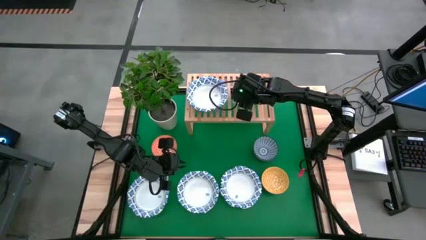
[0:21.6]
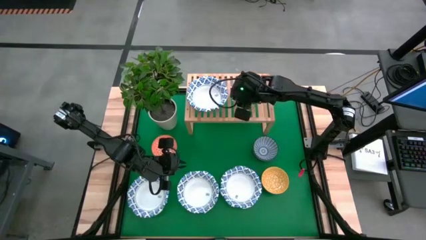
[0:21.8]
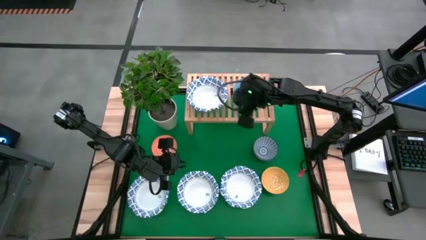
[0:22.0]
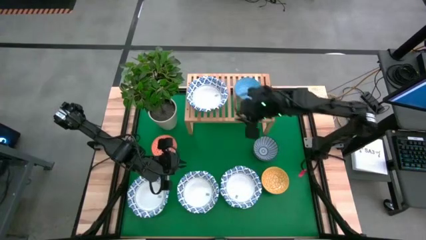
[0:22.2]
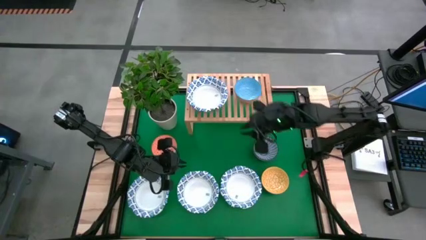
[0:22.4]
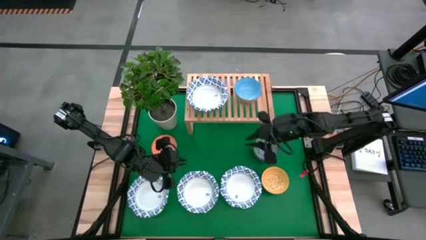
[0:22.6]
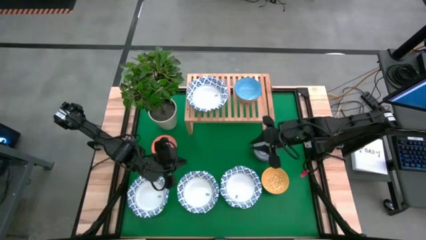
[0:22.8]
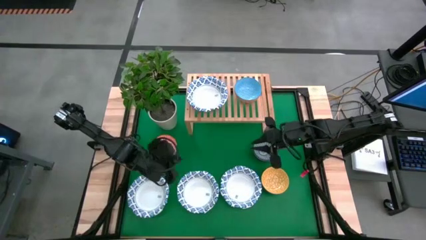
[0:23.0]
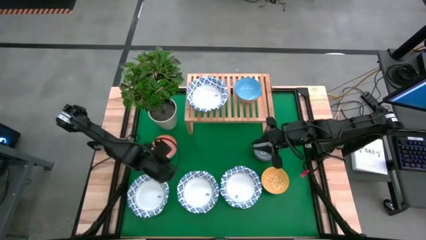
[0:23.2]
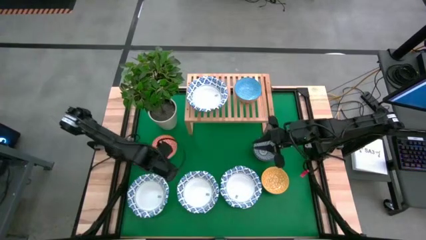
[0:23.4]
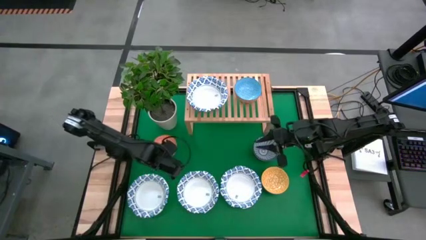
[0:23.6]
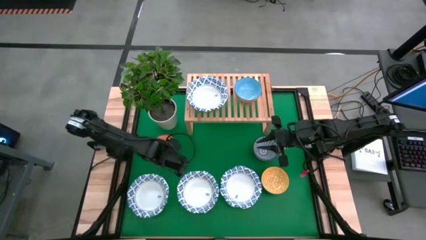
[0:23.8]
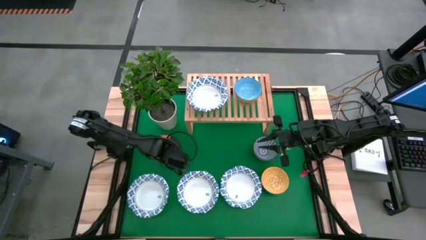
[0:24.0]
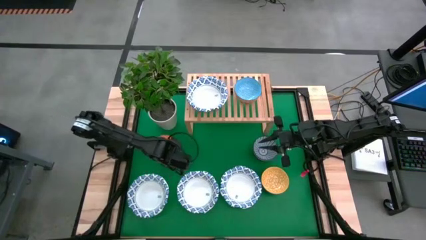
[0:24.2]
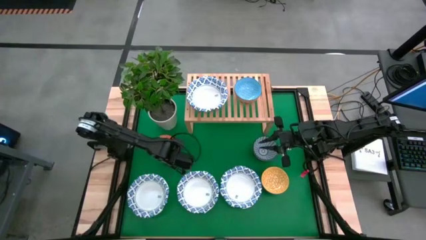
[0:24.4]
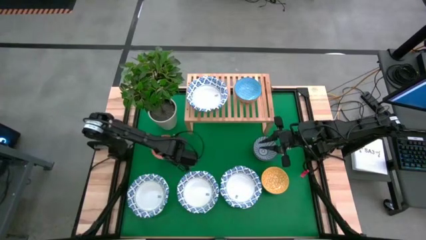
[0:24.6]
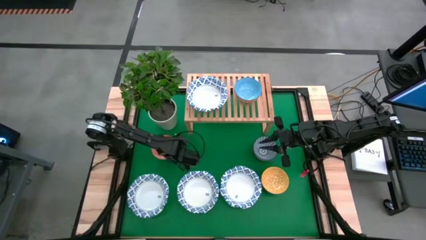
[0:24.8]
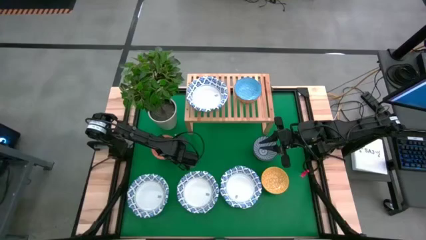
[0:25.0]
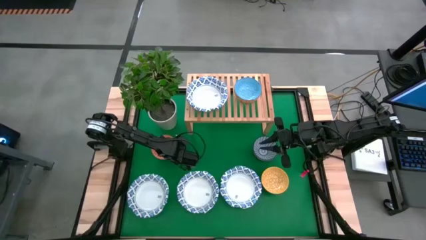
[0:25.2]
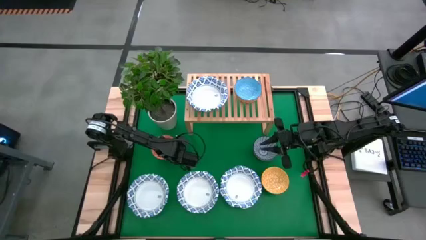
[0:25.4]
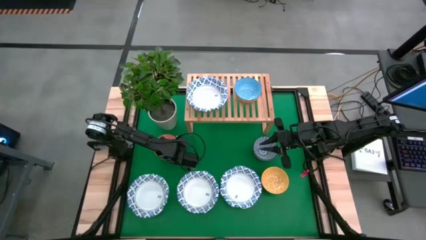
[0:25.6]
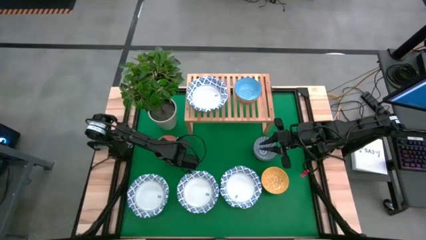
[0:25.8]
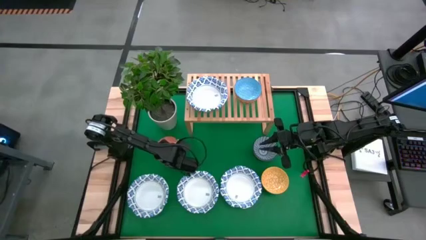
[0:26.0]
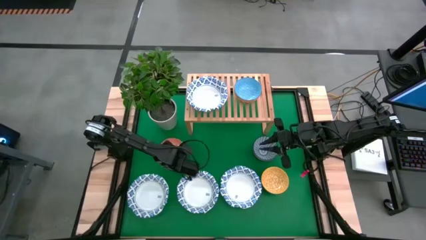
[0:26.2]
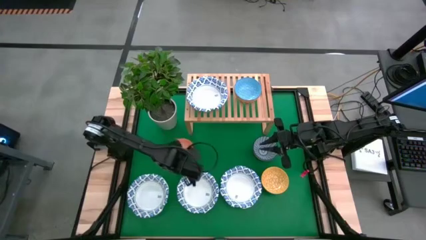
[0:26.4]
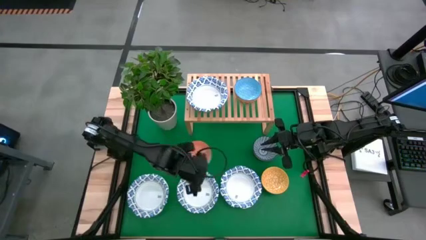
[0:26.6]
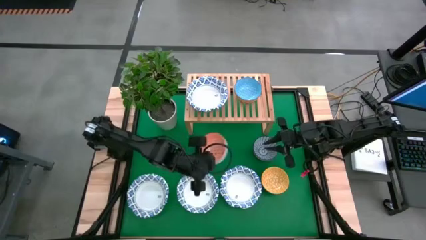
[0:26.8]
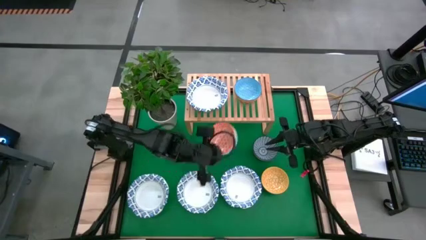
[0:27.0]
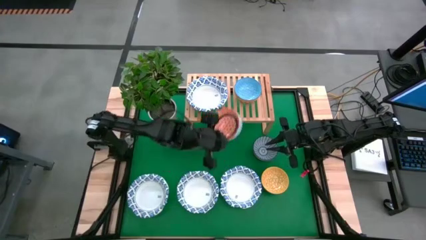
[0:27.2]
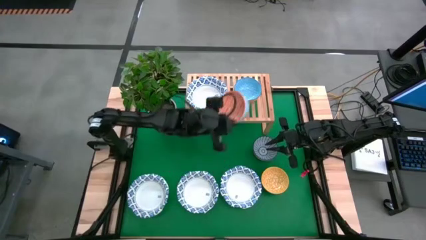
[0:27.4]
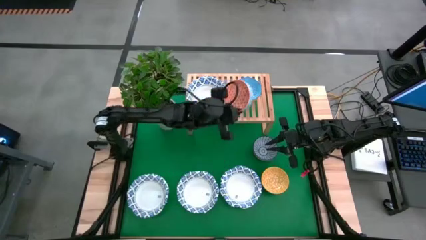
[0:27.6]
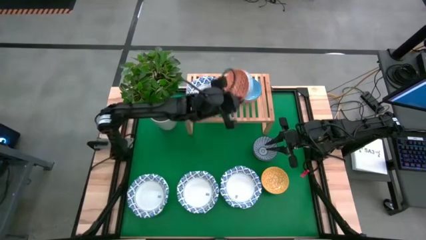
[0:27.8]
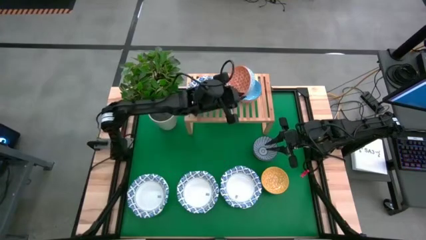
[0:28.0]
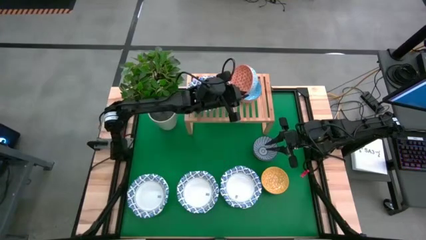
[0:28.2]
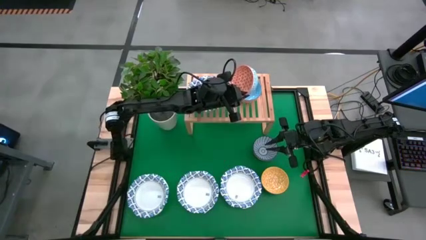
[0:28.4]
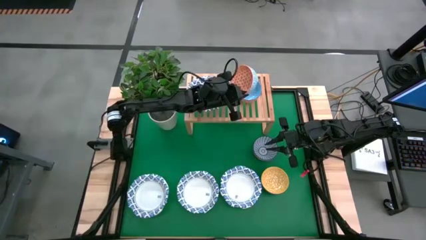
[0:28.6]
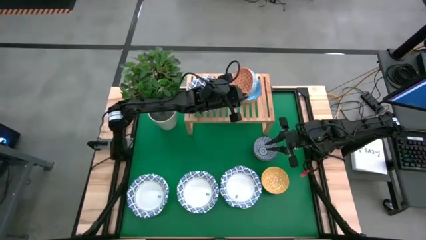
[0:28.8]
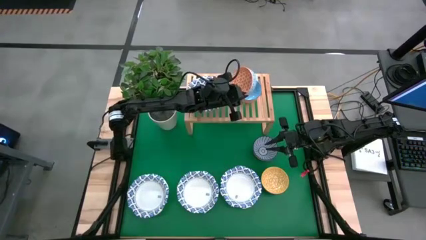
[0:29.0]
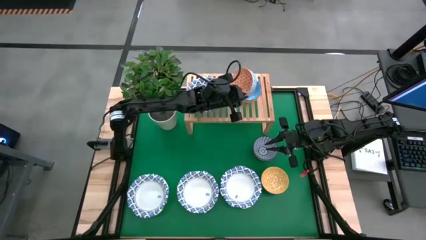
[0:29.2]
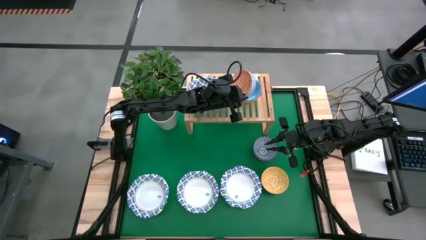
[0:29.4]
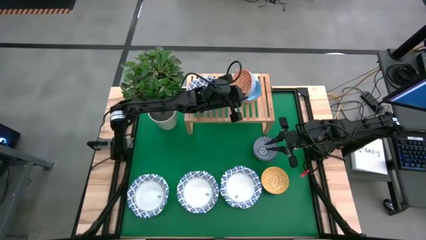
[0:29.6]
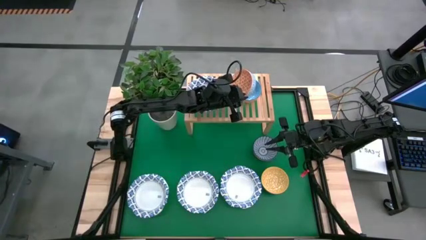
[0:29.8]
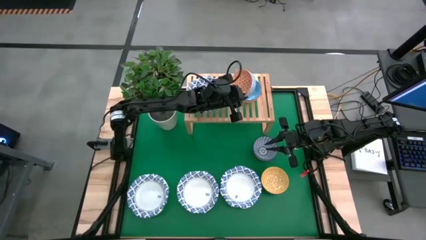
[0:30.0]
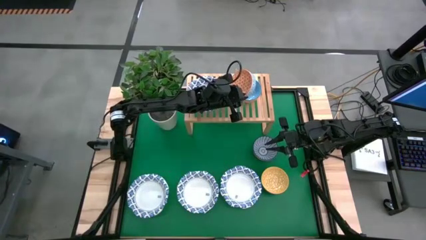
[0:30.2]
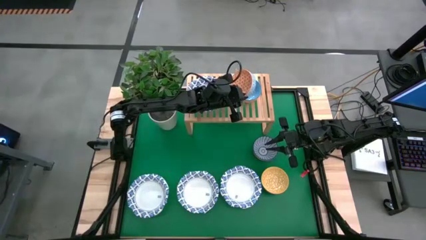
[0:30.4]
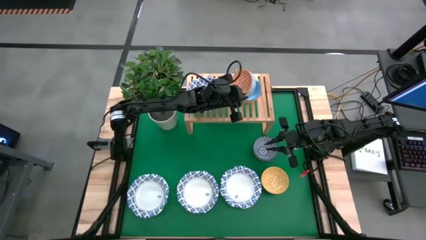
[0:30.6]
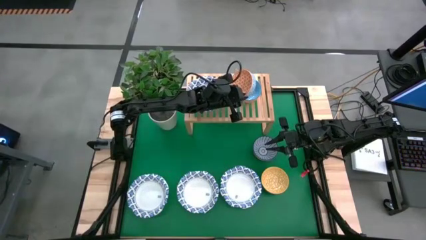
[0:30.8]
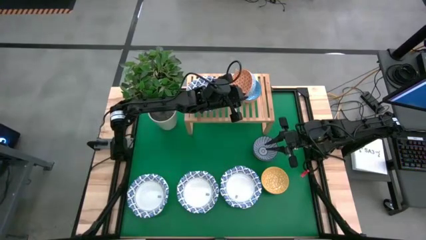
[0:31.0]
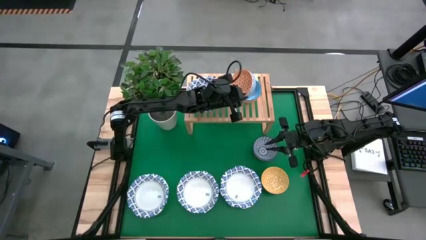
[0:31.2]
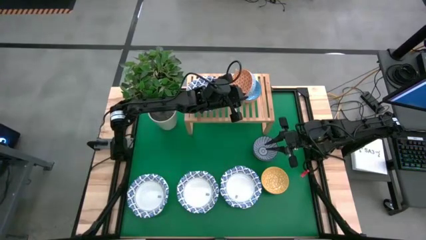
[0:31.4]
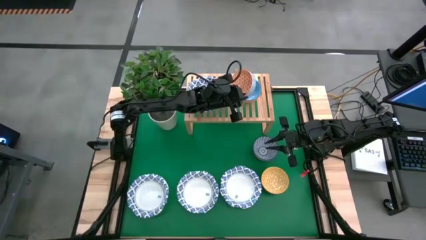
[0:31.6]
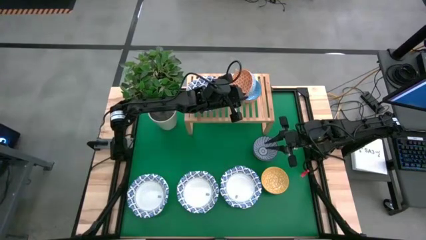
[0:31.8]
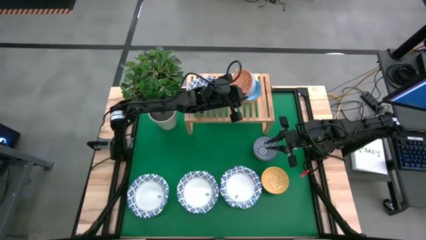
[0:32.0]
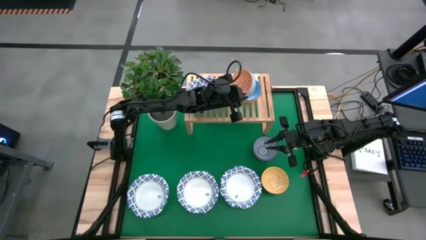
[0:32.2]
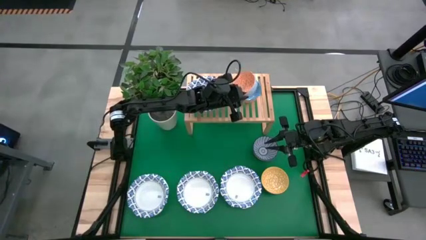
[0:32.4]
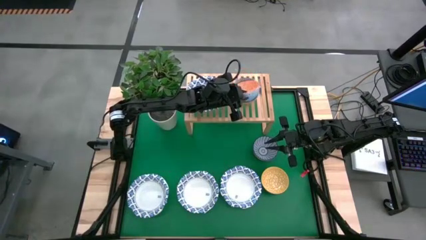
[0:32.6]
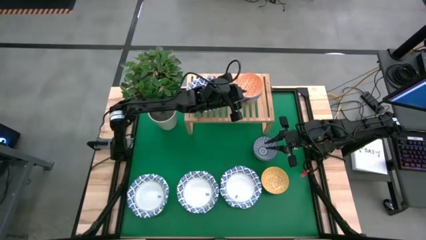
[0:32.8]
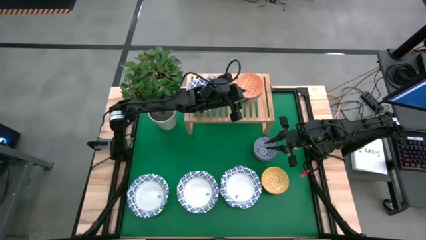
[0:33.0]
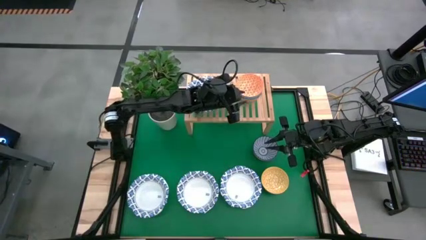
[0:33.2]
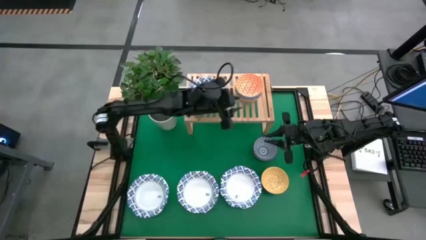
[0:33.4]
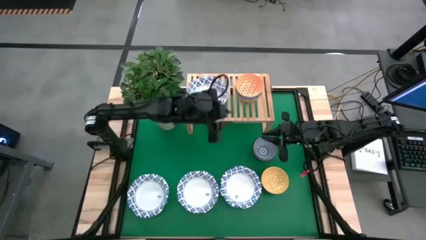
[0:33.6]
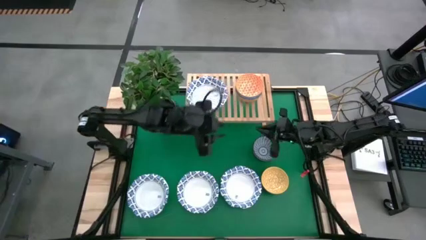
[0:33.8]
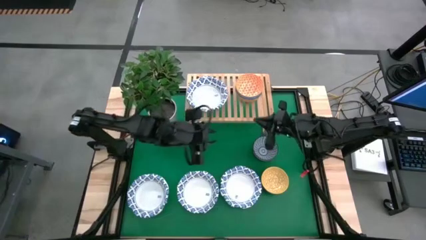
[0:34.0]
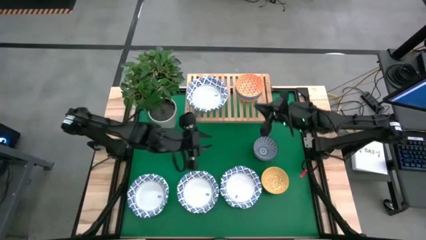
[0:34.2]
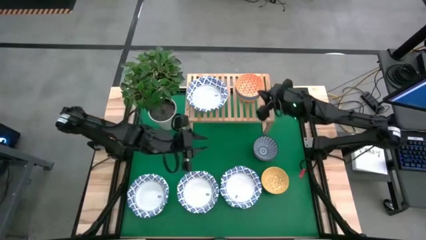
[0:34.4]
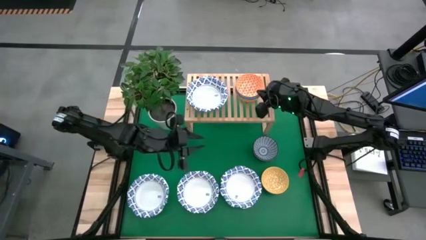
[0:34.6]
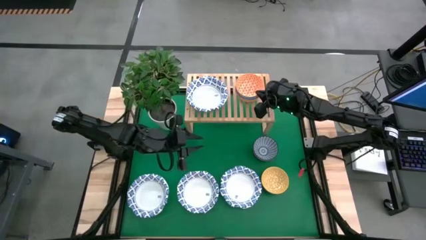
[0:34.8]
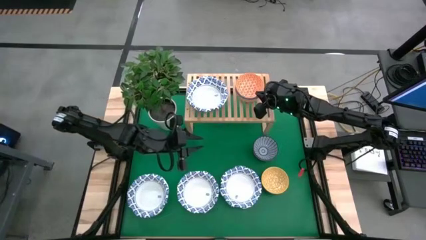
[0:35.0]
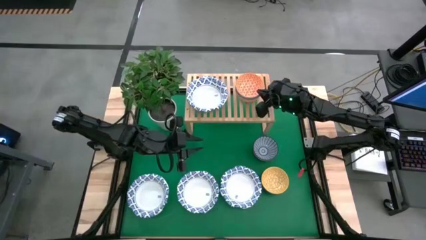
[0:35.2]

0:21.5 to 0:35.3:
Task: Place and stack bowls onto a shelf
Stack the orange bowl on top of the light blue bowl on the shelf
